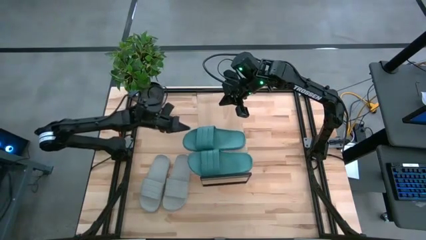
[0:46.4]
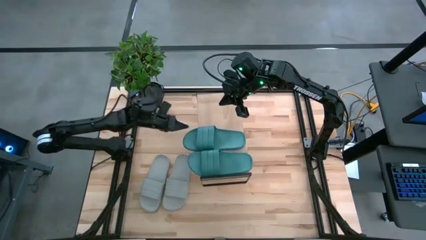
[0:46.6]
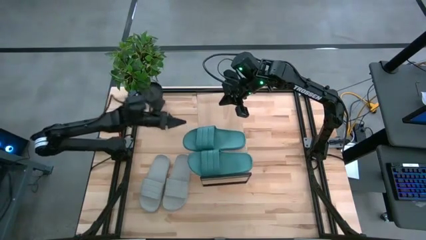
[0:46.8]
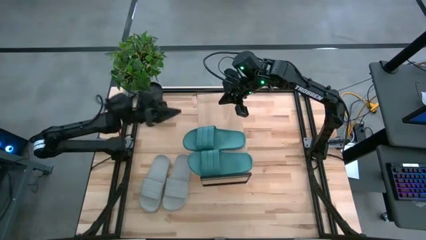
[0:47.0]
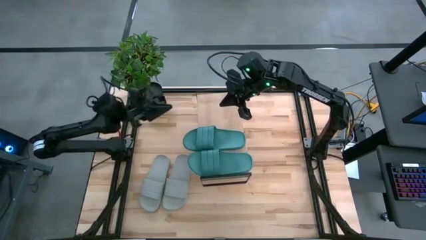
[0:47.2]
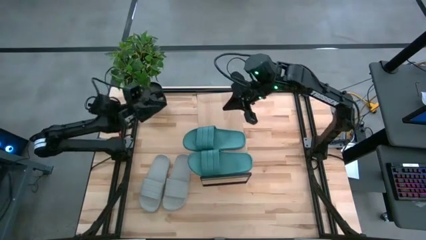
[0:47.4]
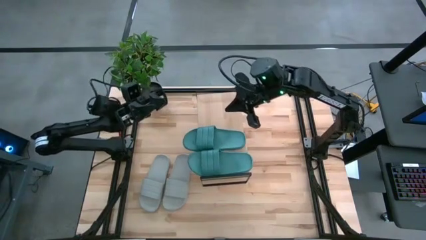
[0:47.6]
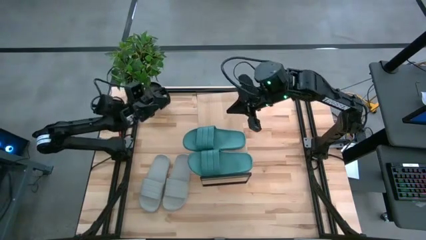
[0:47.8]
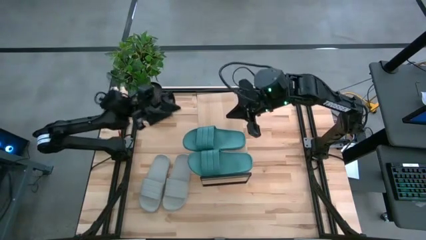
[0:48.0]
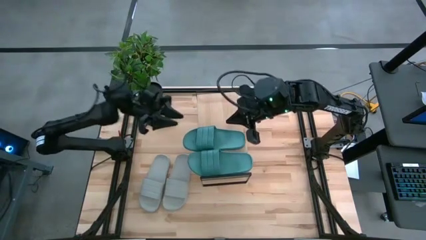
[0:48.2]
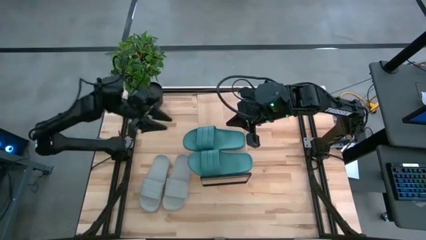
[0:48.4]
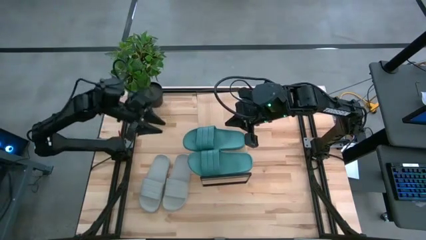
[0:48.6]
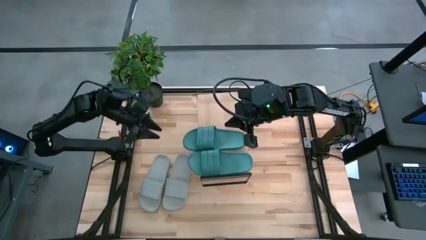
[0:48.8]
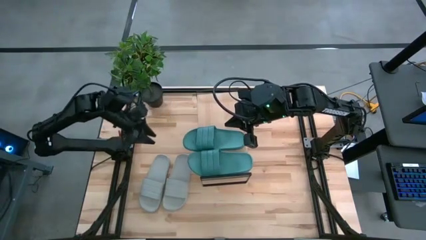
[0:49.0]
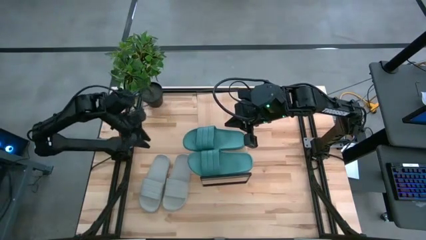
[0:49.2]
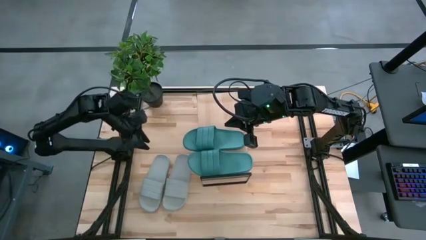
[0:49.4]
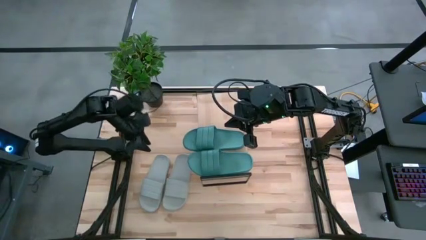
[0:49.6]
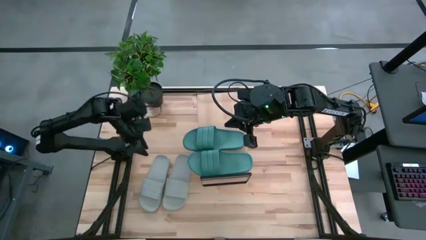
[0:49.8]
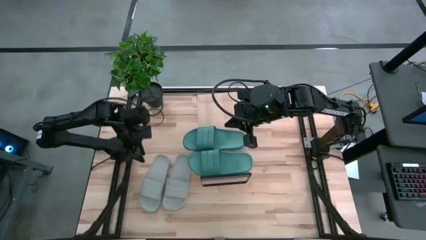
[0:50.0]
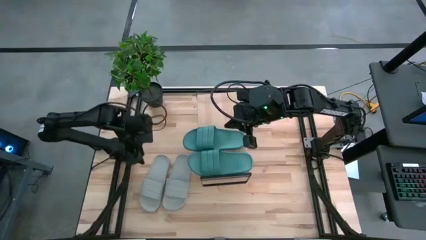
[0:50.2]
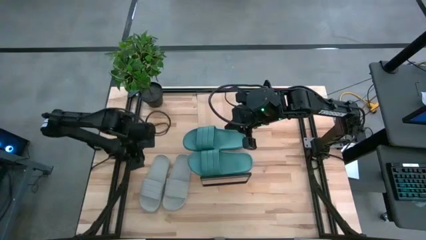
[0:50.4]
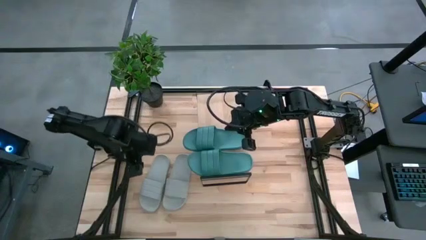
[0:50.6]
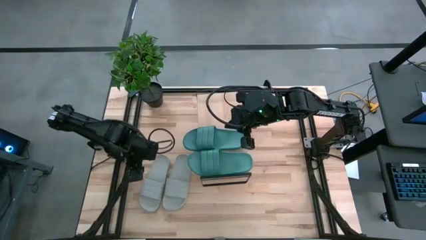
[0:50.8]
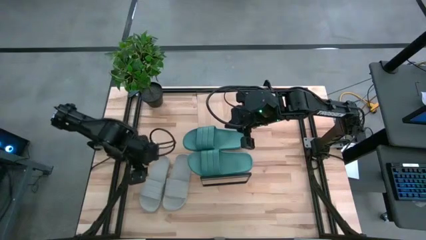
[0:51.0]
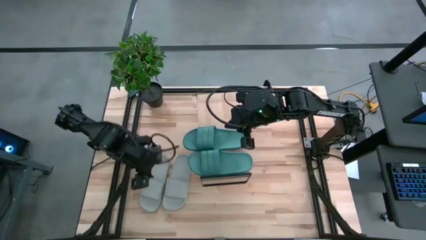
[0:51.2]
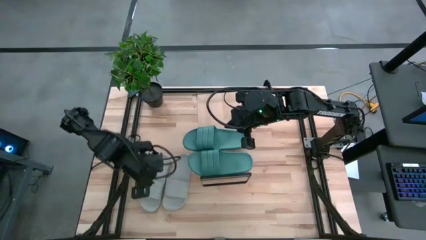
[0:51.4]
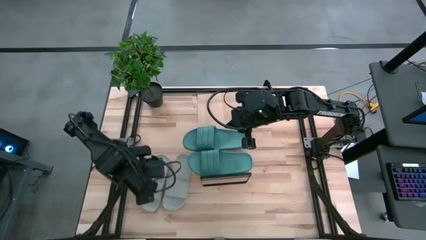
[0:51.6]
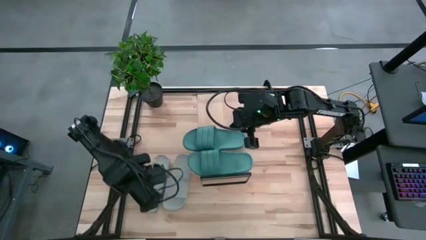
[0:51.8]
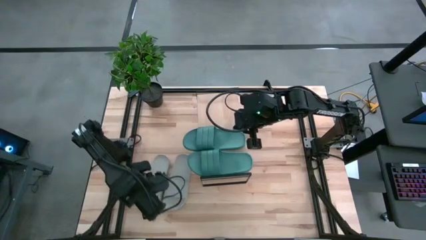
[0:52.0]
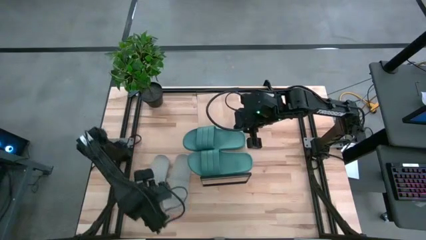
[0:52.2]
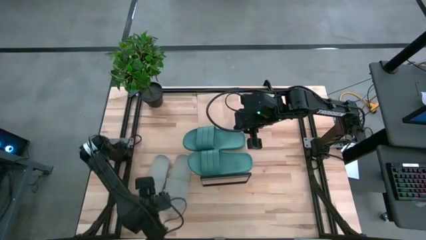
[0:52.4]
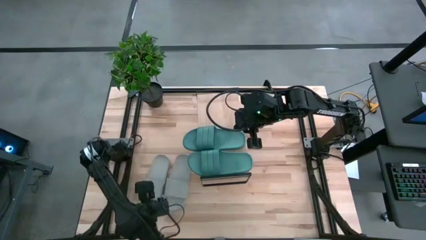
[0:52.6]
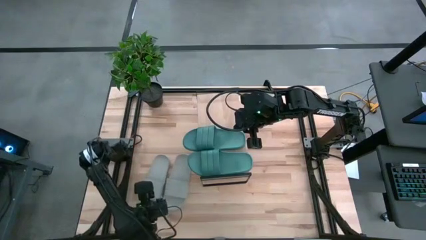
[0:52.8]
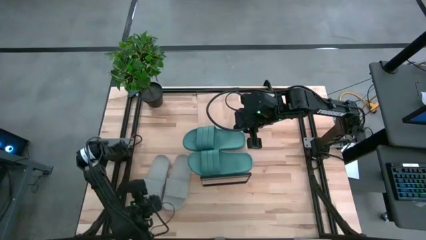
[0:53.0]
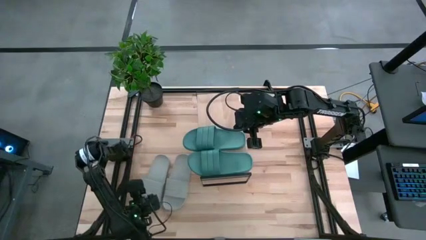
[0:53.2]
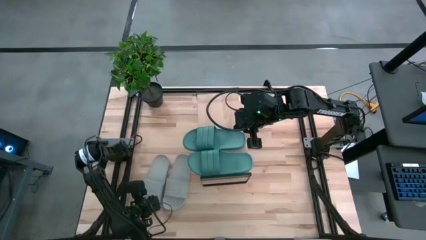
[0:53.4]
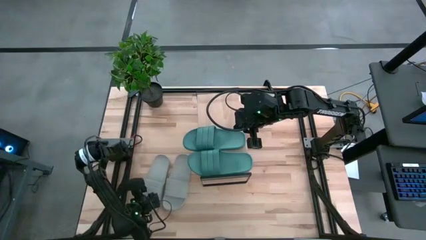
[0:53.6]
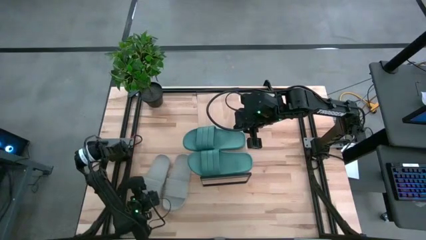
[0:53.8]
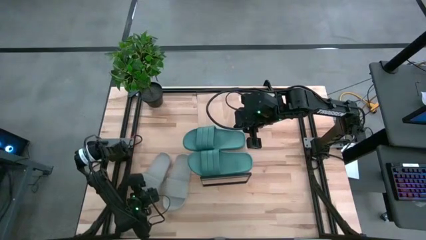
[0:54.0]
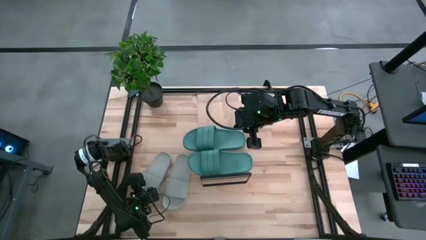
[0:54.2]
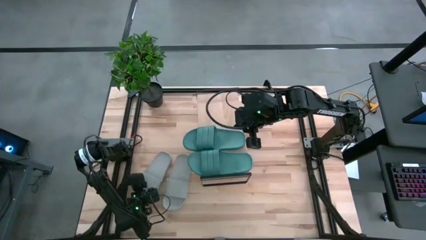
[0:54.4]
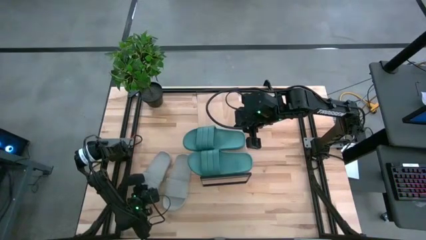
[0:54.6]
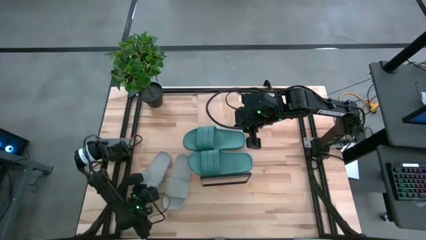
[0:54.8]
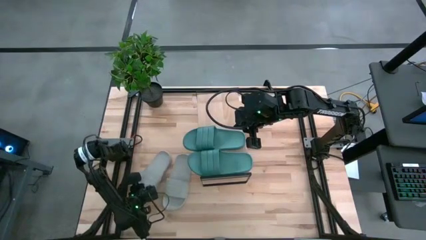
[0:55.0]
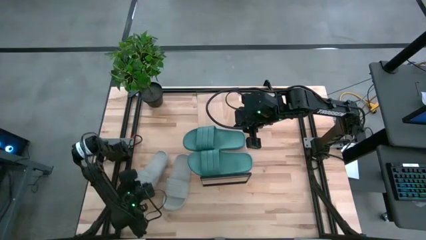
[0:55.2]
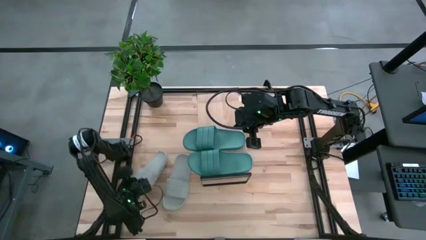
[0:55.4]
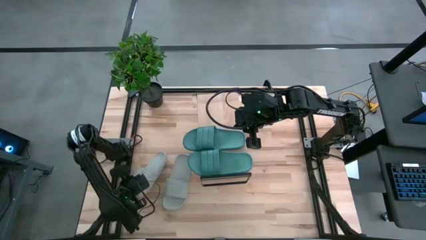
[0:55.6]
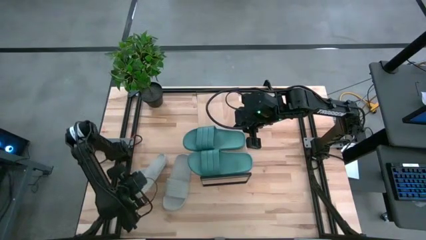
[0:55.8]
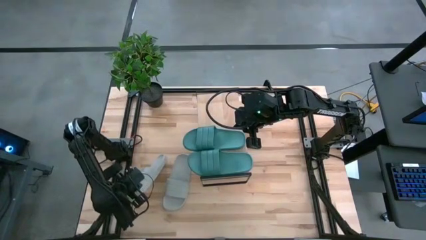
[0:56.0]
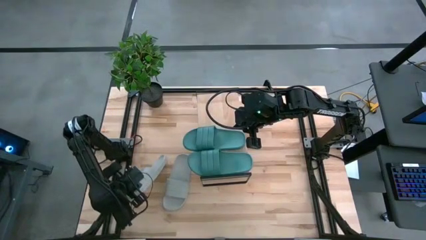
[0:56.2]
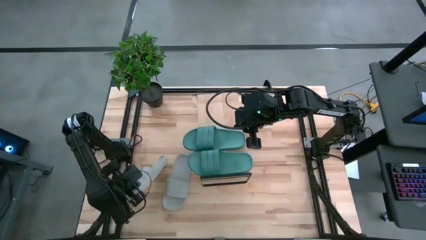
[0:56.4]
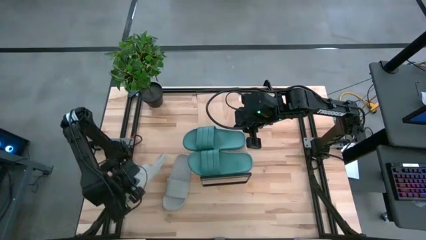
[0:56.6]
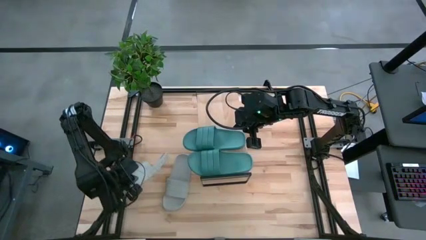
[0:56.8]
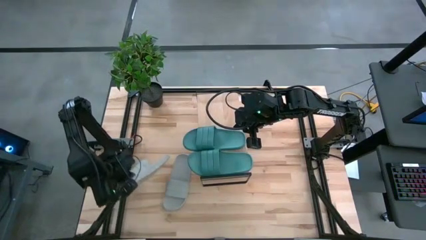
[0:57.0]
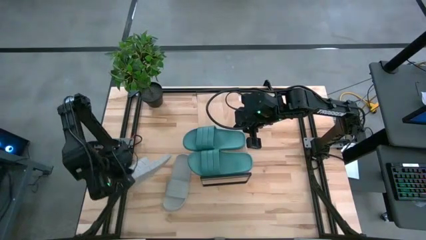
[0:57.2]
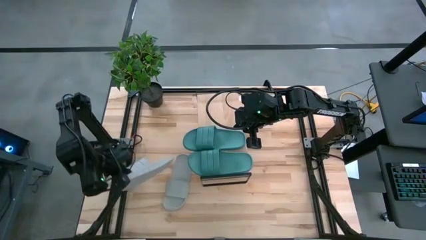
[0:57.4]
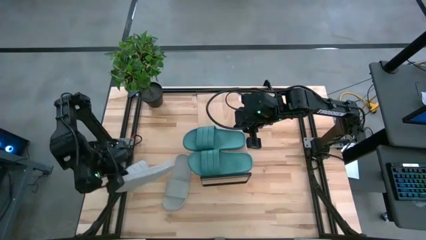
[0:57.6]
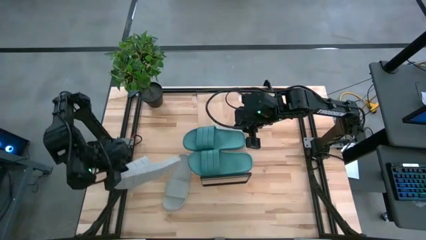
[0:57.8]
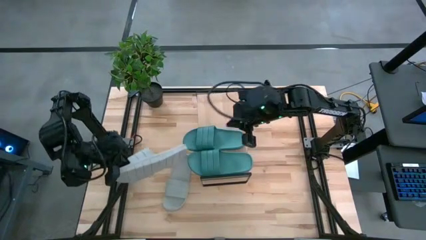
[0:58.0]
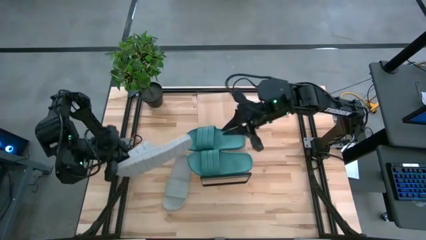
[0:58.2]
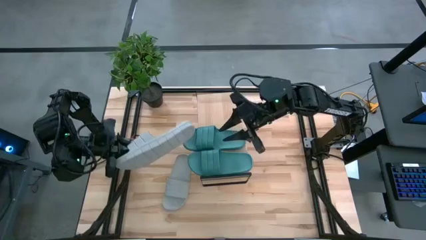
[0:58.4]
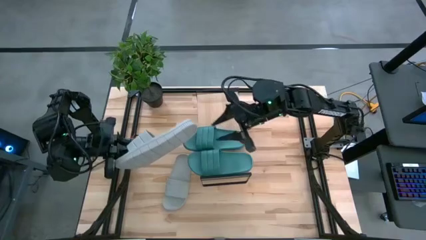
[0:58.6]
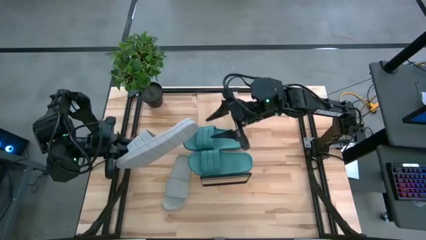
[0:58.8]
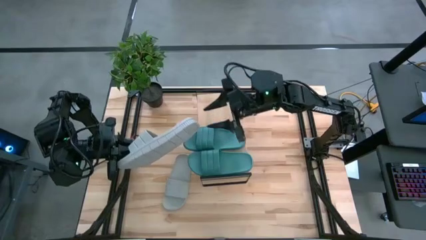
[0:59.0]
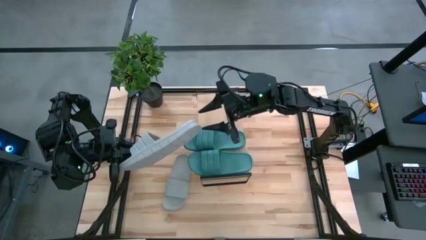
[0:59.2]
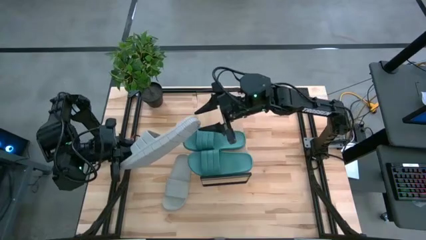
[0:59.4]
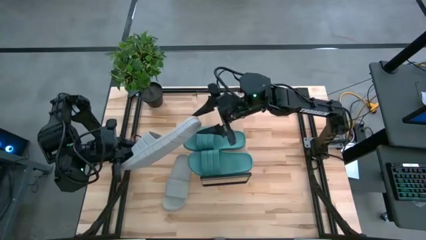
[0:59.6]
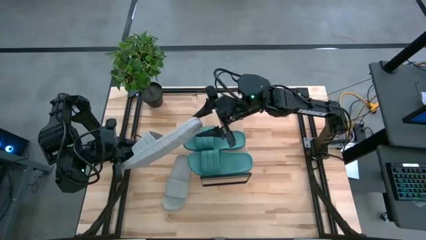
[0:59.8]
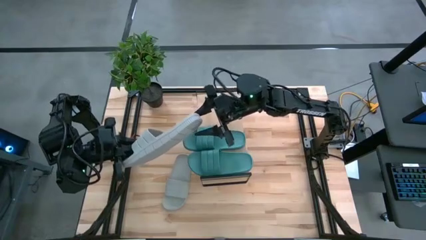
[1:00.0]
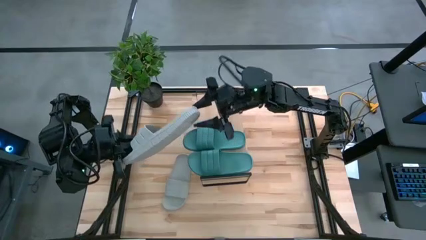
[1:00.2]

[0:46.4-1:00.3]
Task: Pick and place slides into the shelf
Put the left gray slipper on the shelf
